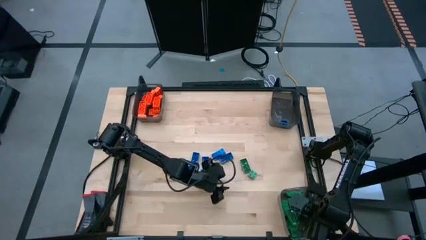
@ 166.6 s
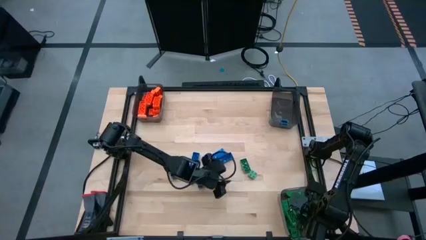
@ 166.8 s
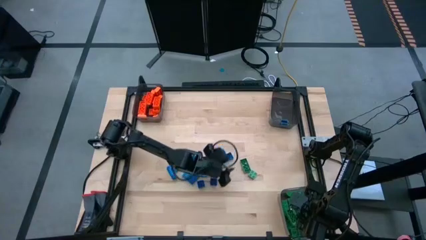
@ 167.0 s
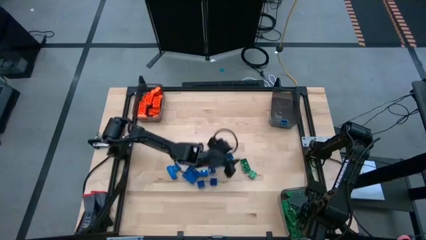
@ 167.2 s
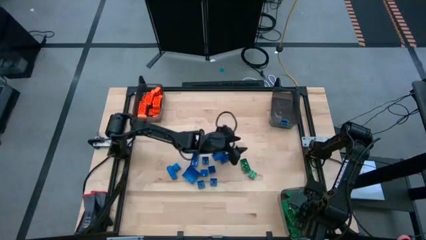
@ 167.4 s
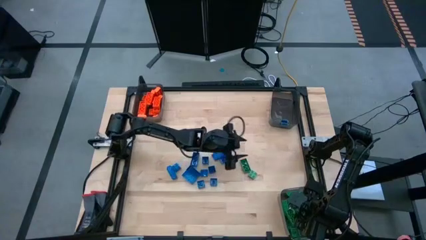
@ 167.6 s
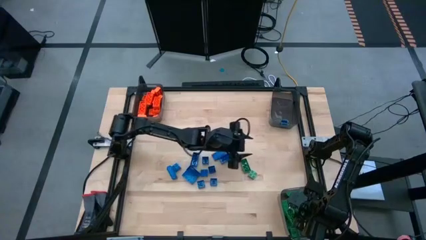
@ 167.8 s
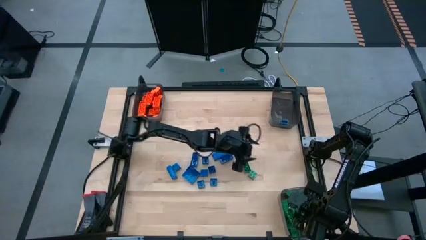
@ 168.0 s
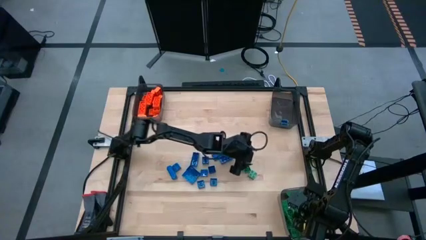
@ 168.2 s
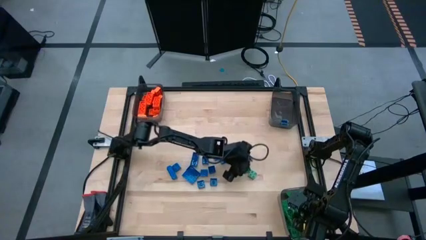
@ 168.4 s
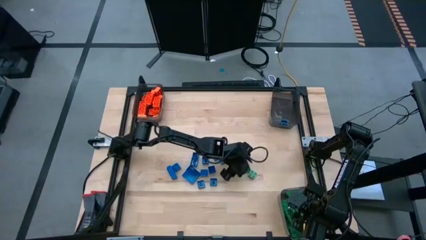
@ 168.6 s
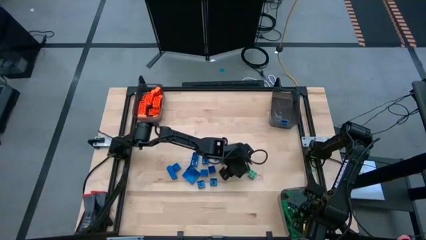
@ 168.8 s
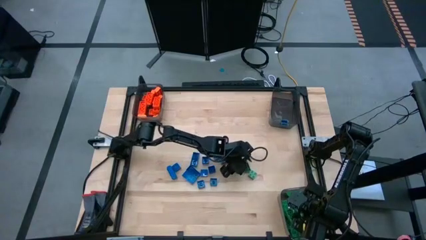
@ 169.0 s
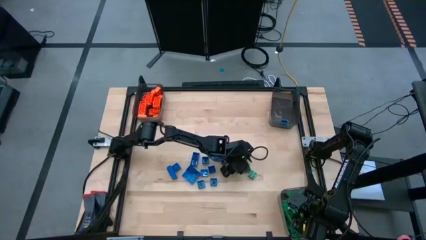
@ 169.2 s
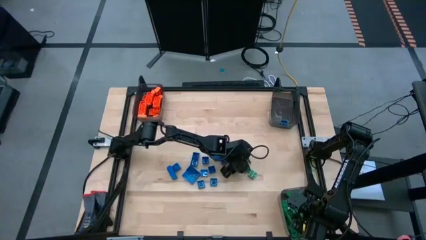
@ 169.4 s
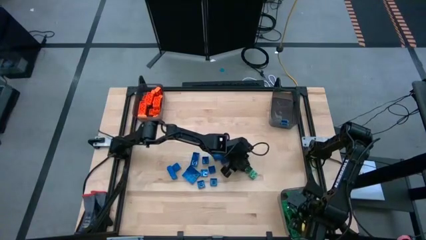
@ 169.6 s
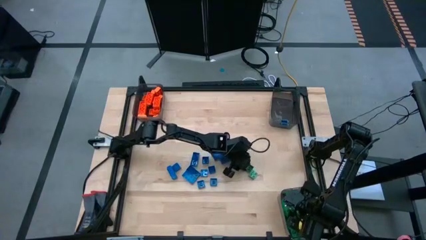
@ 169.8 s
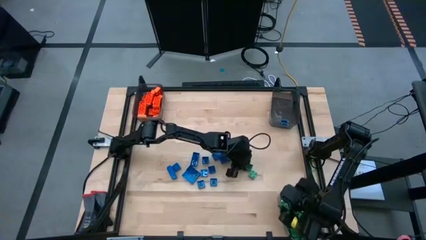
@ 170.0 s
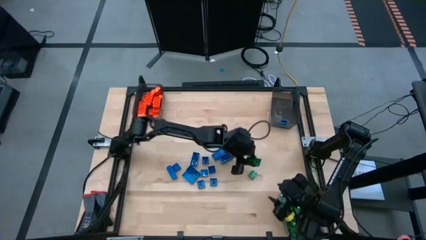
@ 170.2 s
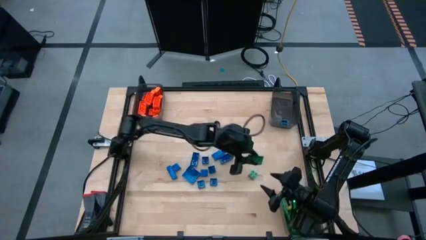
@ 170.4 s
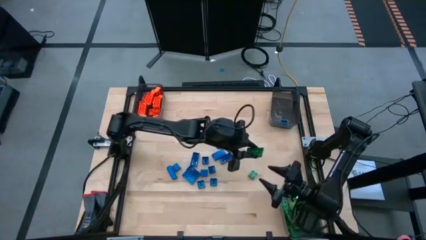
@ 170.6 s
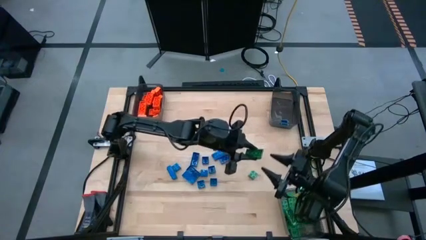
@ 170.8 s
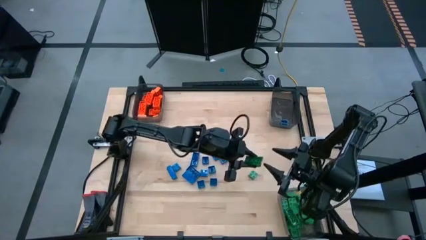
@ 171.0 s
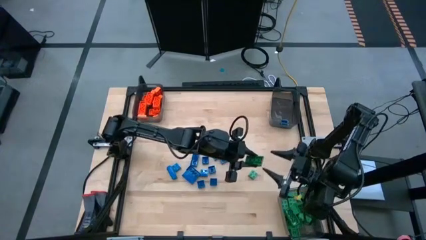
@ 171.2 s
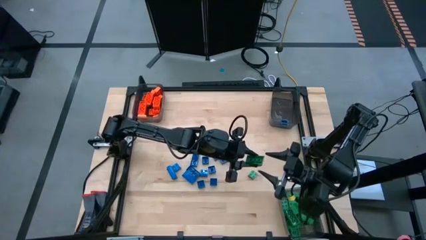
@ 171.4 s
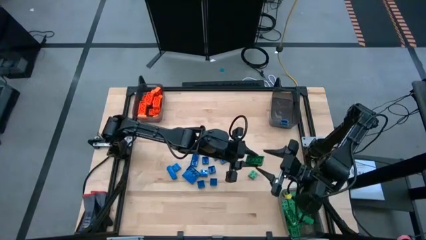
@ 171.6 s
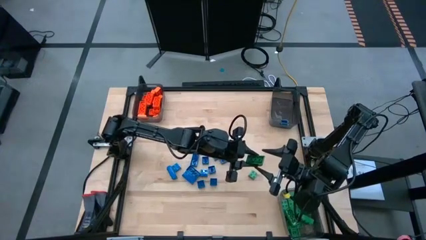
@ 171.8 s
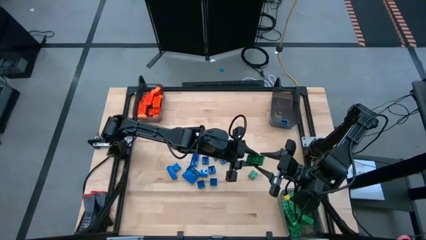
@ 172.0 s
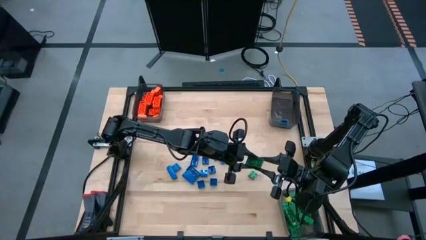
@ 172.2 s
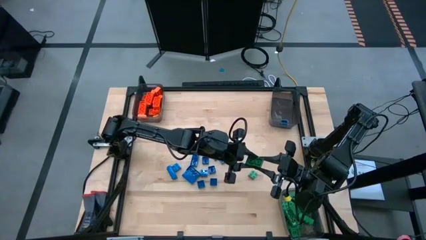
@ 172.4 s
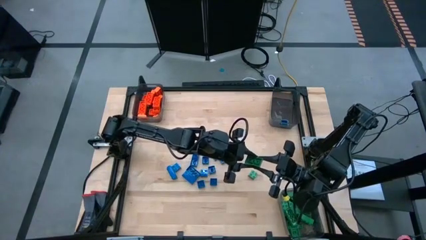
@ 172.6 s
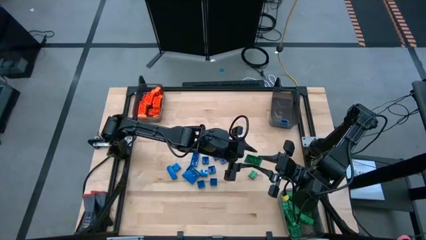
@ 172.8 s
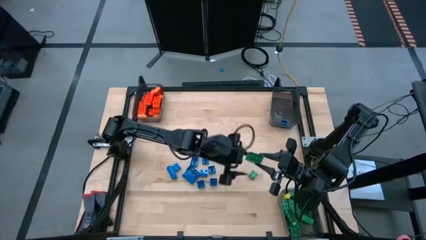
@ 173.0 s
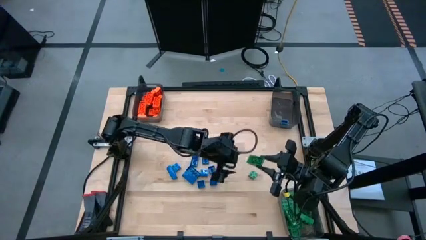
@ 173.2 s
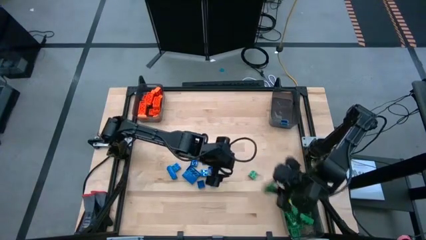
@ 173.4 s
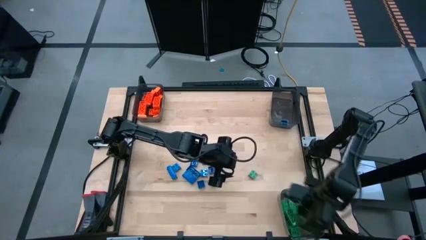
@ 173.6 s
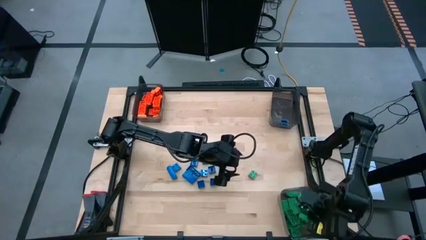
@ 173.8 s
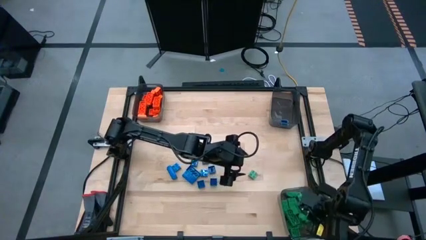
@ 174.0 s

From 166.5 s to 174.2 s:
Task: Sort blocks
Put the green game piece into the bottom right black bin

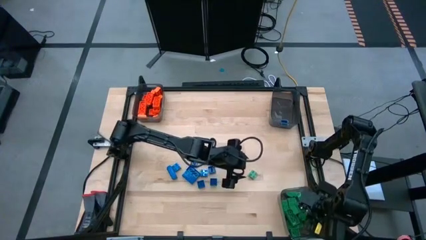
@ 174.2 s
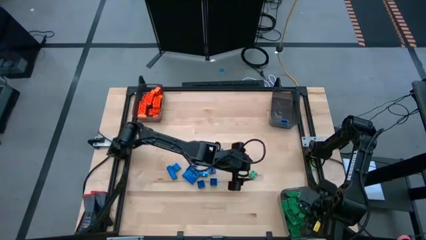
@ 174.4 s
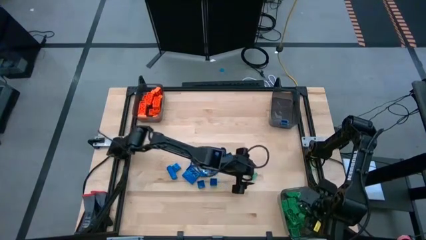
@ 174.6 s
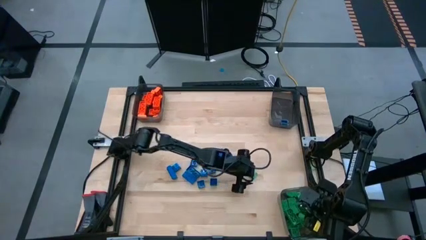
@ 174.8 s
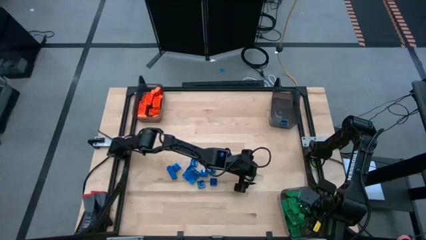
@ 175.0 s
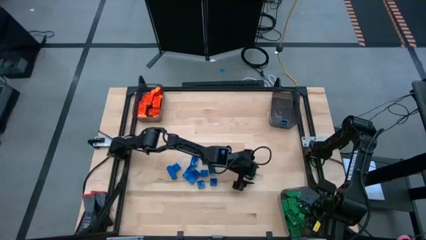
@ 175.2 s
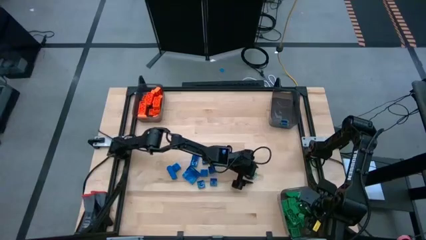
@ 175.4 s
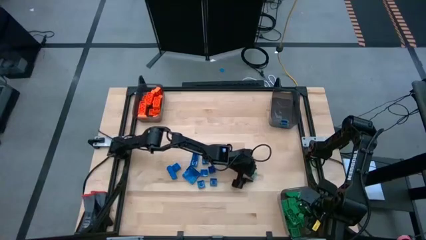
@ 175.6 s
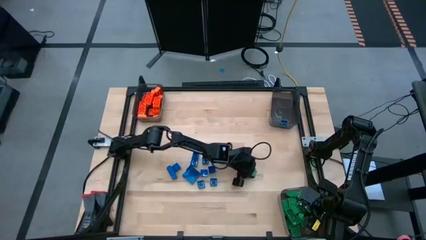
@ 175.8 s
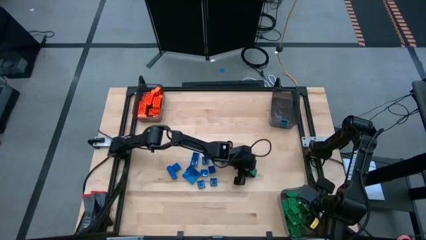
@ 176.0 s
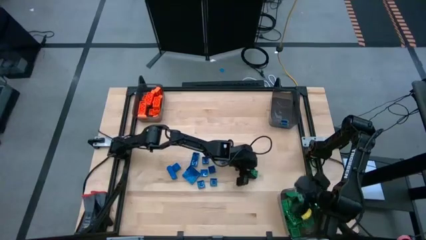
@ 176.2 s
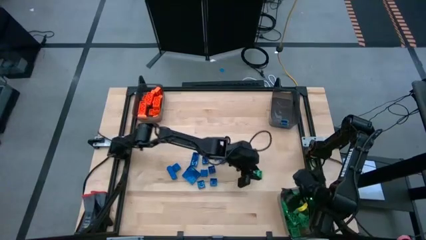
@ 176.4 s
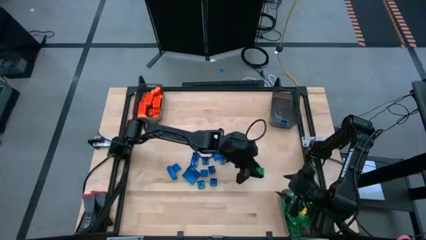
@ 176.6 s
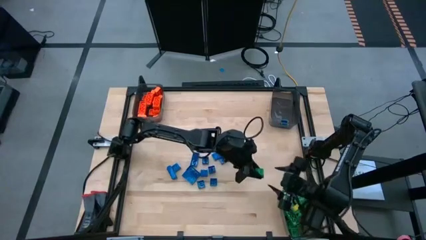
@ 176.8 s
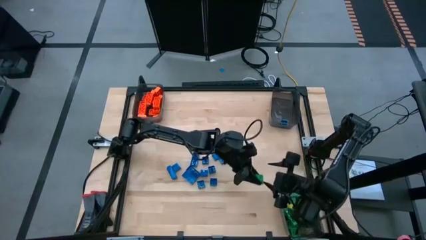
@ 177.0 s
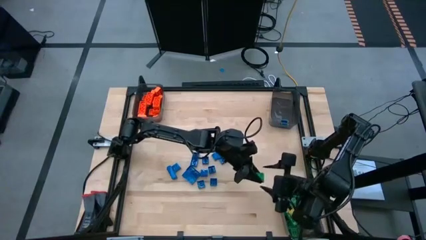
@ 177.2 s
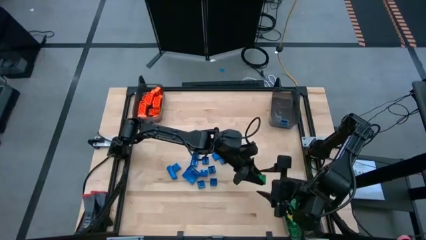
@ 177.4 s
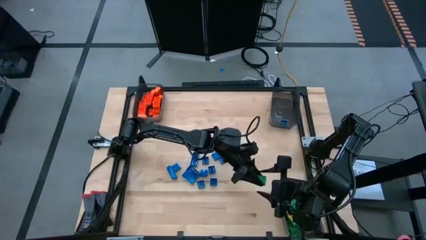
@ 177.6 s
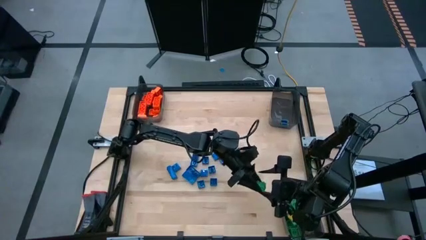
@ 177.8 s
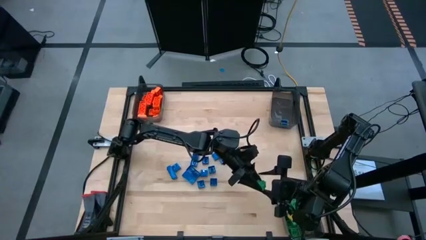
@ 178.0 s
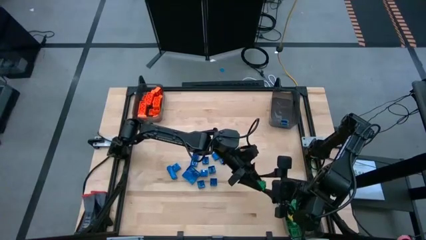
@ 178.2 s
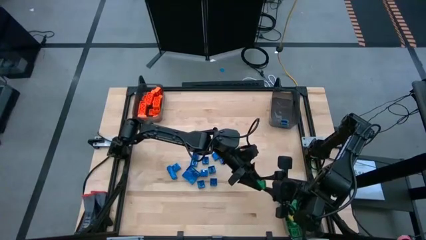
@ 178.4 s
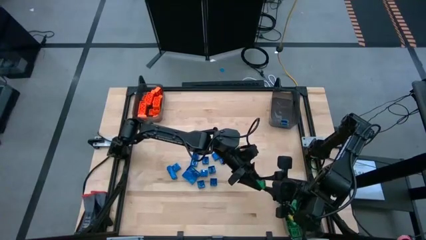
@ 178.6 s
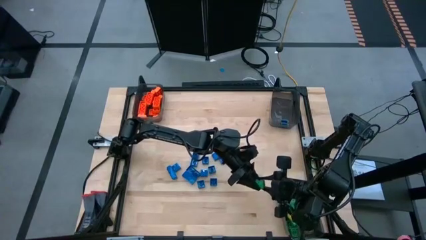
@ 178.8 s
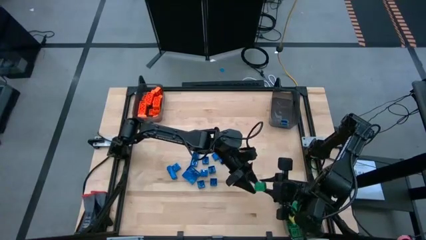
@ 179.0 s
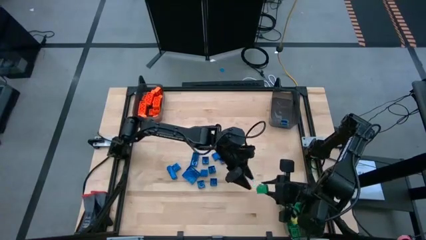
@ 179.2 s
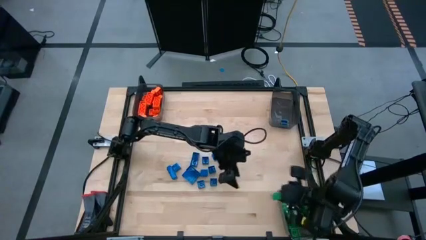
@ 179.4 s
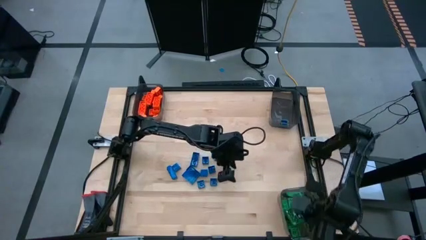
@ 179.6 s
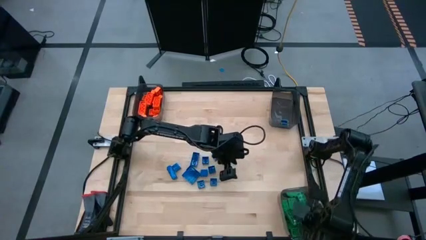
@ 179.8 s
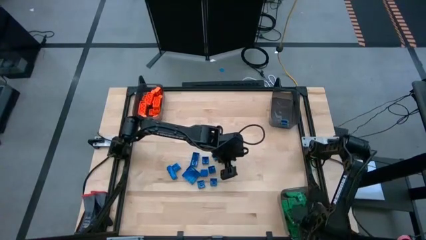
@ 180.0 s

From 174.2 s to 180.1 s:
Put the green game piece into the bottom right black bin

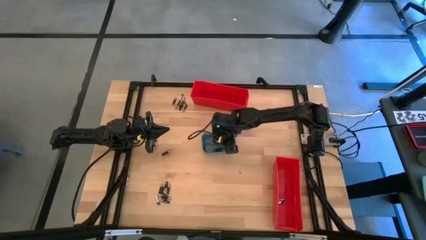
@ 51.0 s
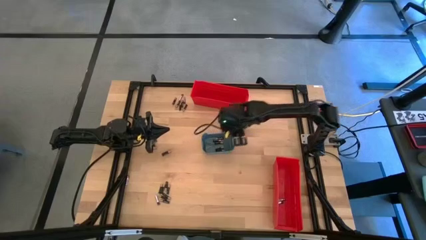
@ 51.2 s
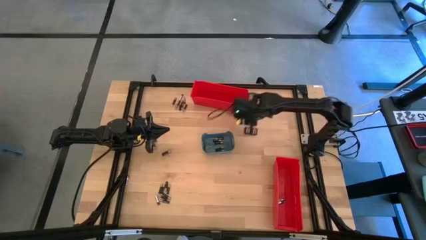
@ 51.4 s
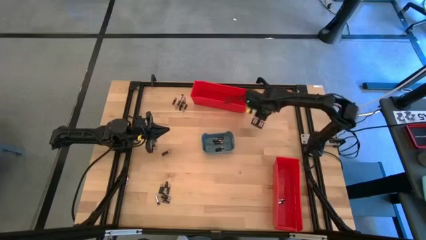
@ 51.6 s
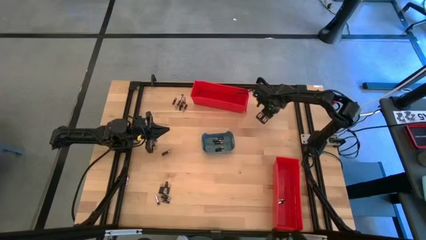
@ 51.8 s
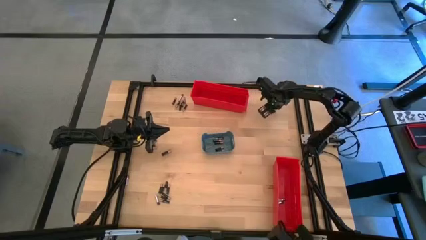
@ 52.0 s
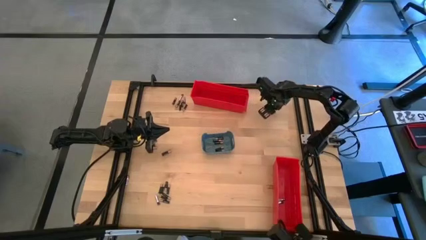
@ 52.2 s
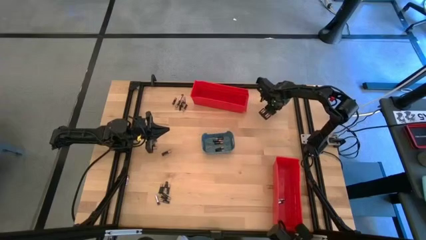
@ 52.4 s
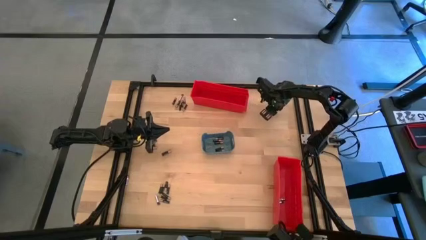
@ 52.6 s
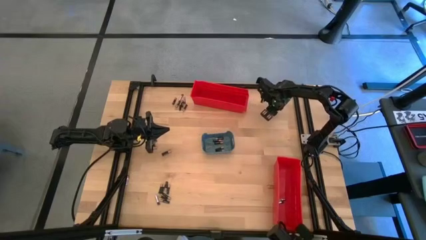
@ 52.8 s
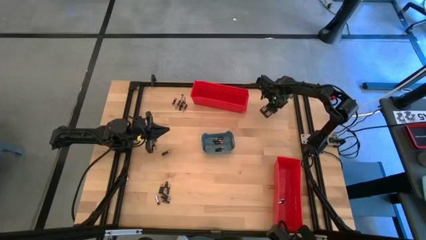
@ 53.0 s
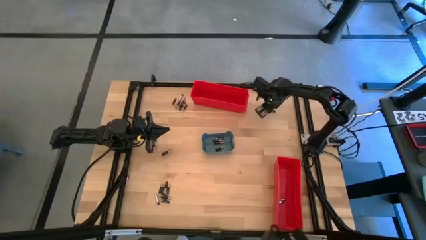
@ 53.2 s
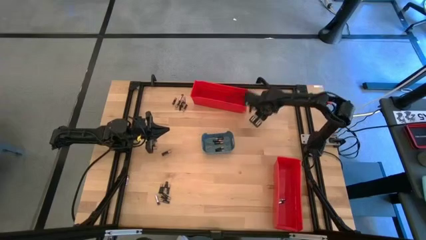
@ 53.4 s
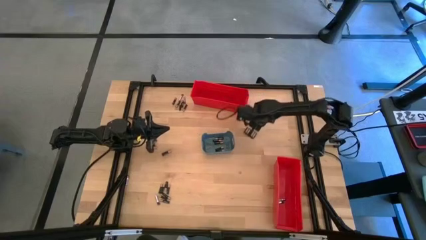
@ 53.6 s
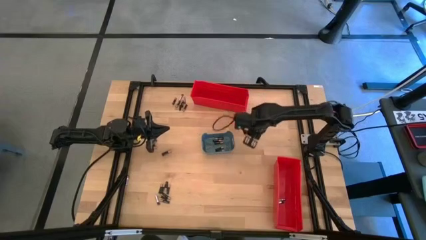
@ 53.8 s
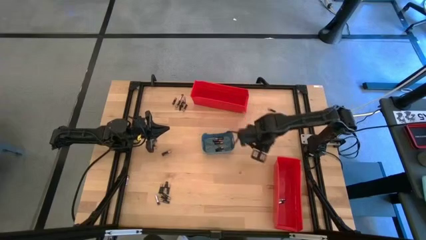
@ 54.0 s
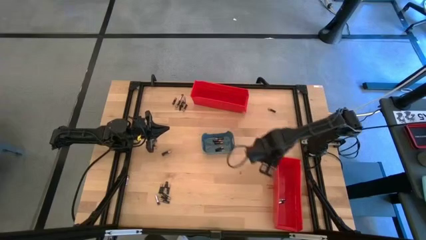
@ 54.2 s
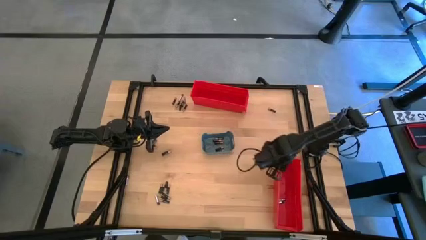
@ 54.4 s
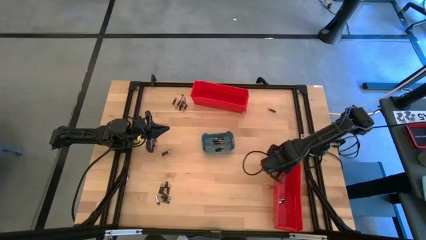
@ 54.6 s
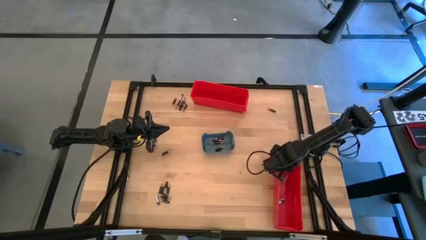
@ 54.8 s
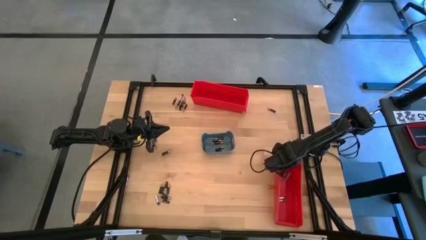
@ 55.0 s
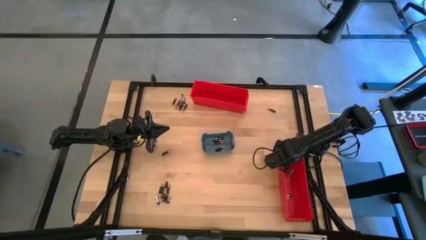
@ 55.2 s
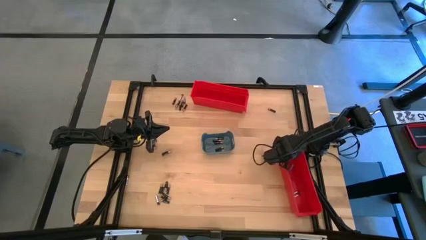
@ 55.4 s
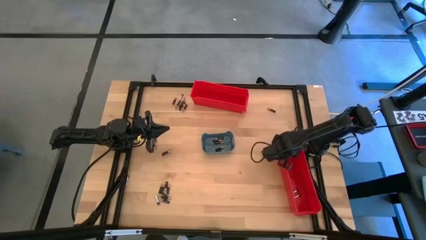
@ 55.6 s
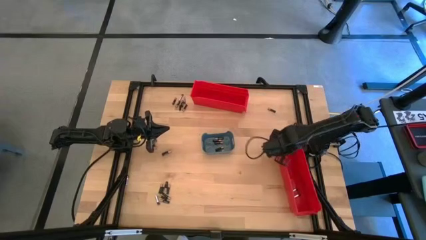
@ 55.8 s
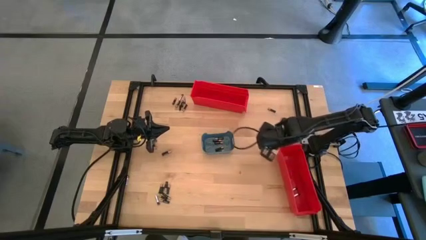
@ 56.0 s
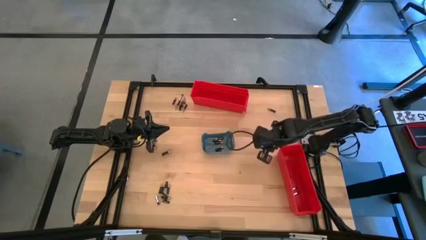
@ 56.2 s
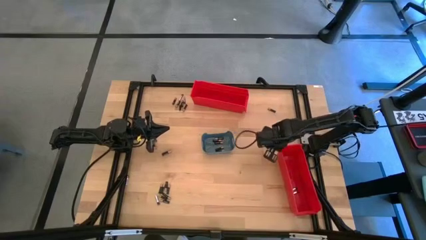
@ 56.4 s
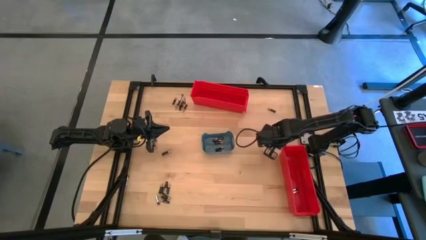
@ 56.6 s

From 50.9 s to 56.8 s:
Task: Sort batteries
Adjust the bottom red bin
